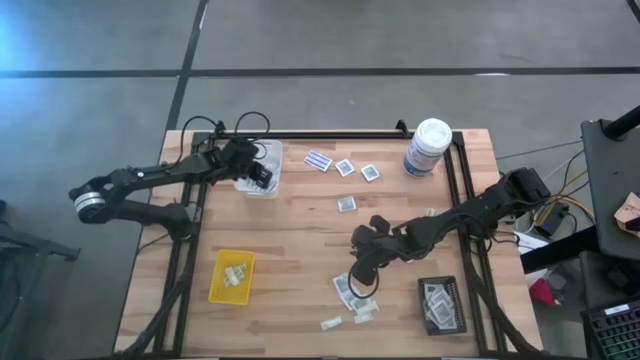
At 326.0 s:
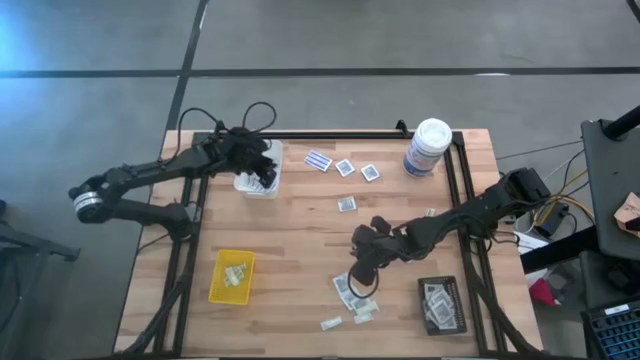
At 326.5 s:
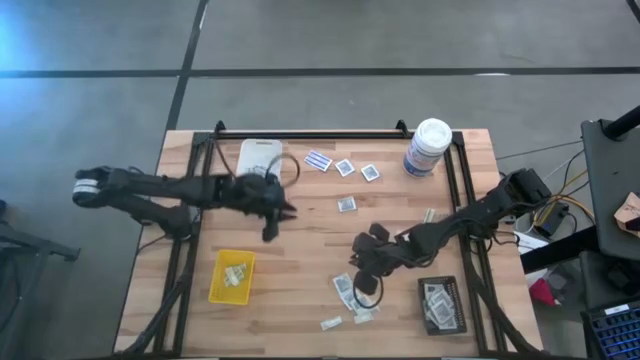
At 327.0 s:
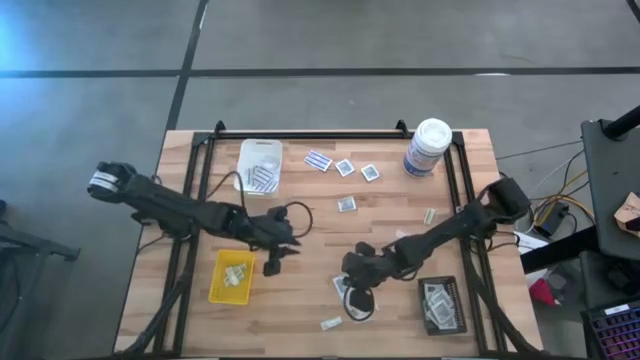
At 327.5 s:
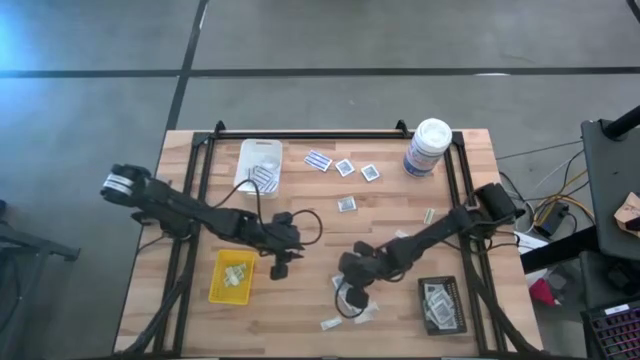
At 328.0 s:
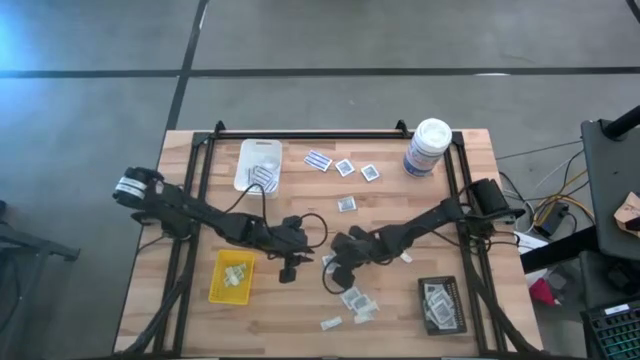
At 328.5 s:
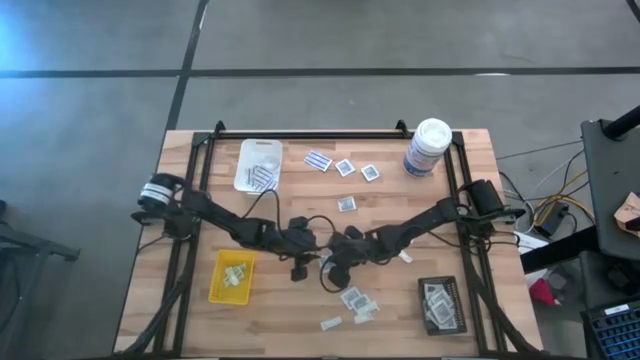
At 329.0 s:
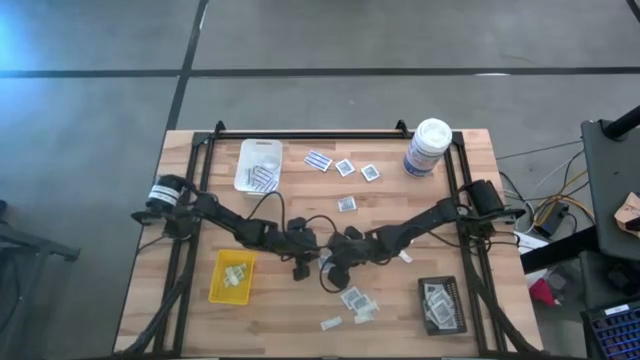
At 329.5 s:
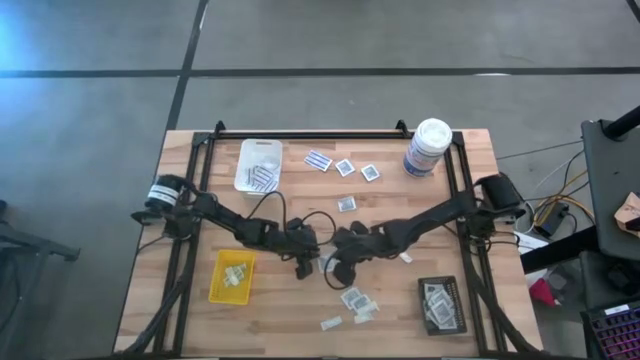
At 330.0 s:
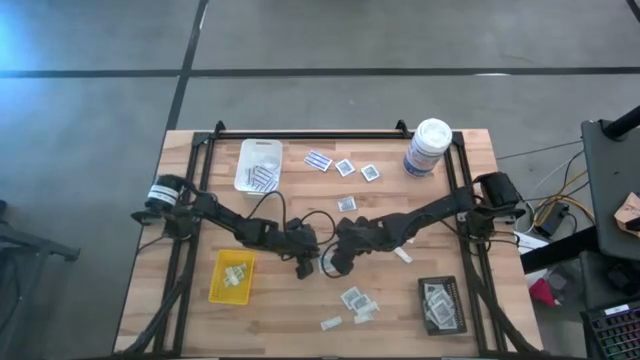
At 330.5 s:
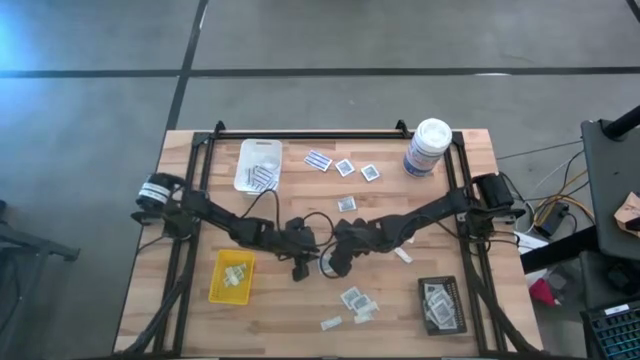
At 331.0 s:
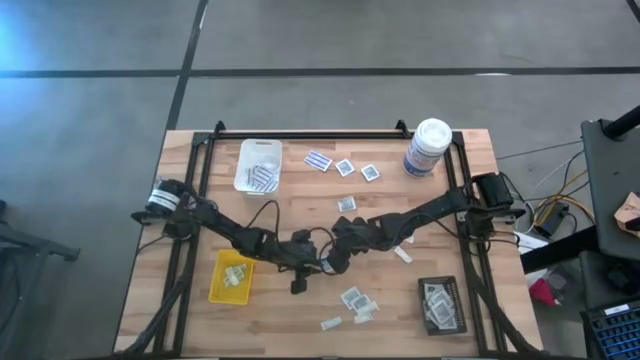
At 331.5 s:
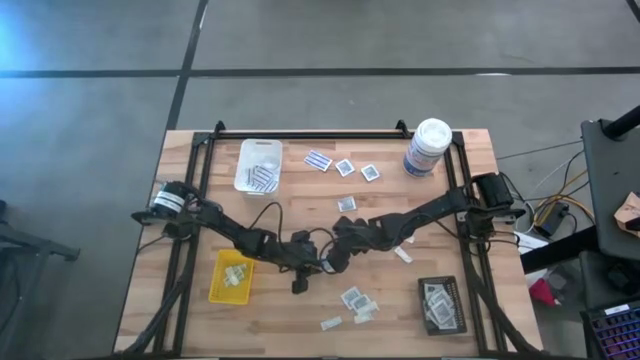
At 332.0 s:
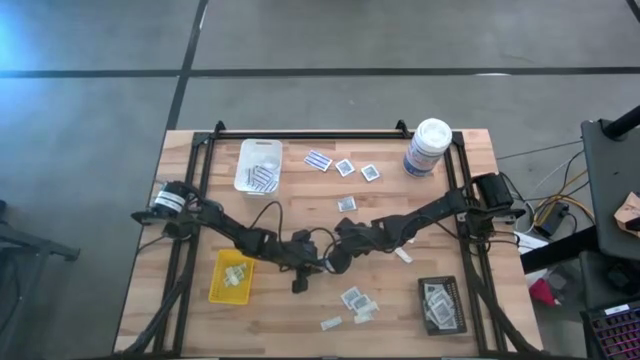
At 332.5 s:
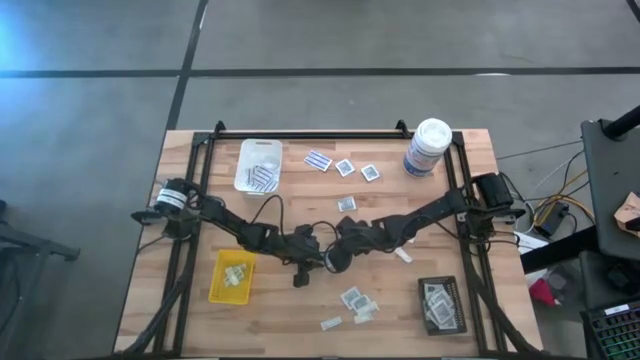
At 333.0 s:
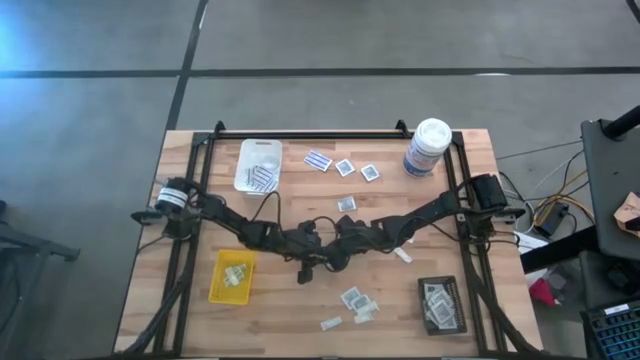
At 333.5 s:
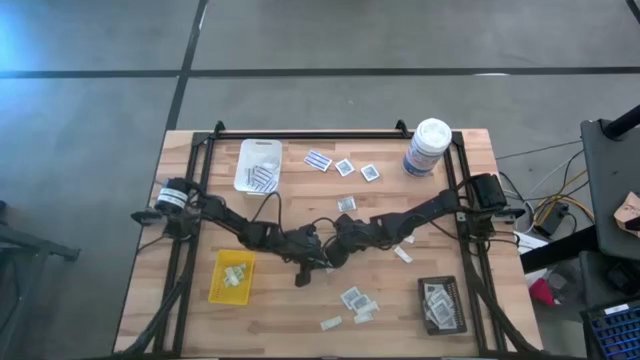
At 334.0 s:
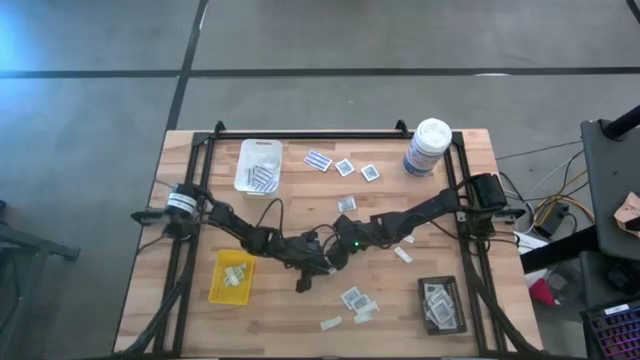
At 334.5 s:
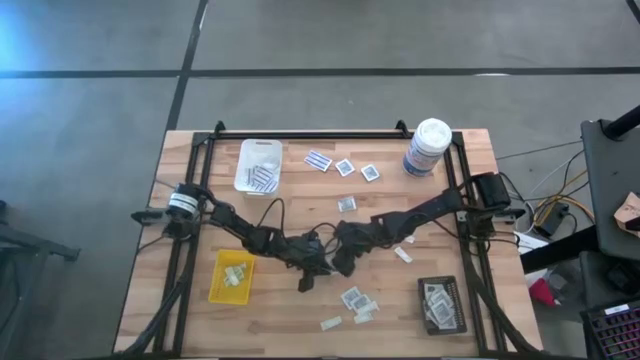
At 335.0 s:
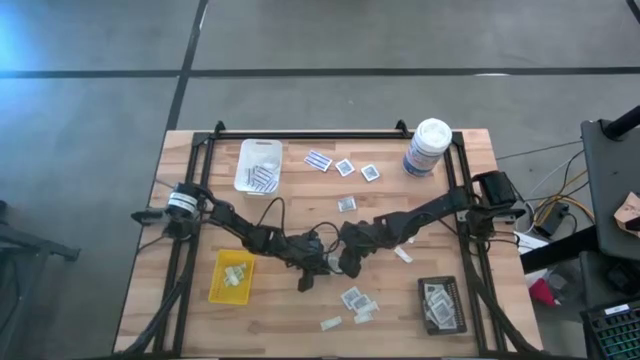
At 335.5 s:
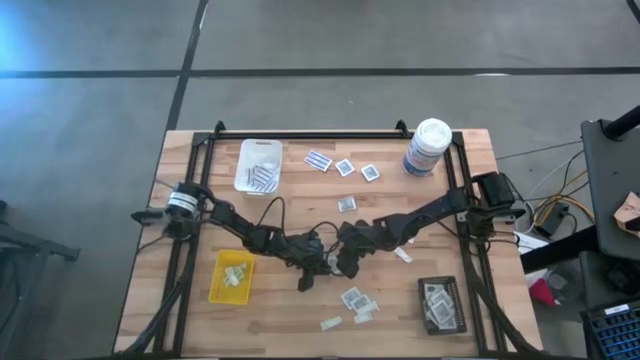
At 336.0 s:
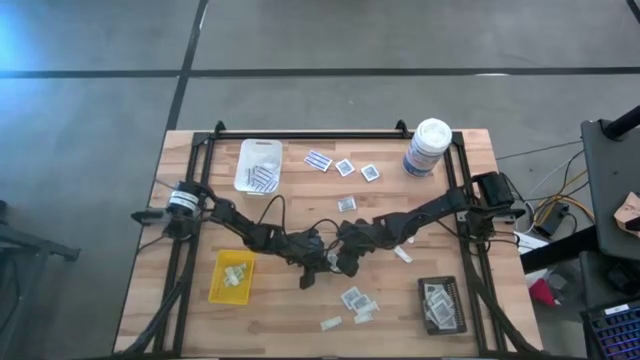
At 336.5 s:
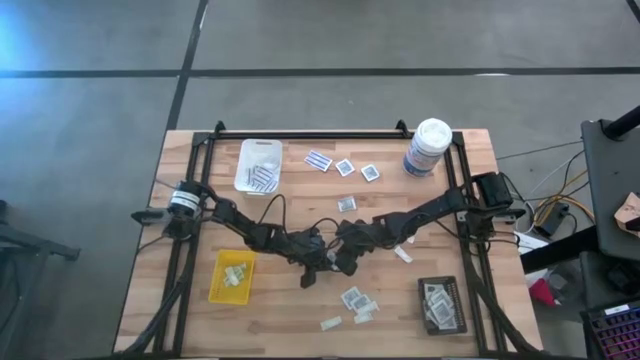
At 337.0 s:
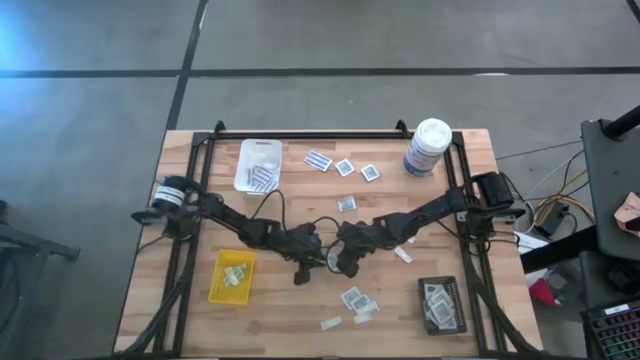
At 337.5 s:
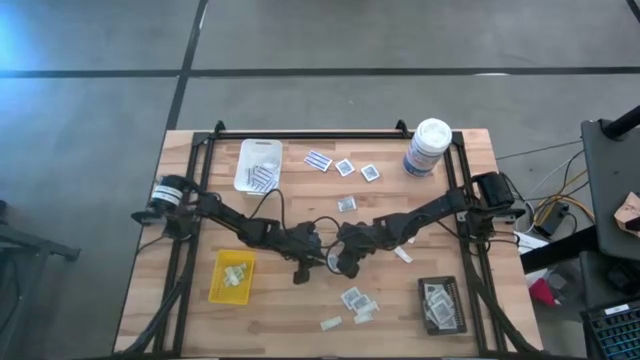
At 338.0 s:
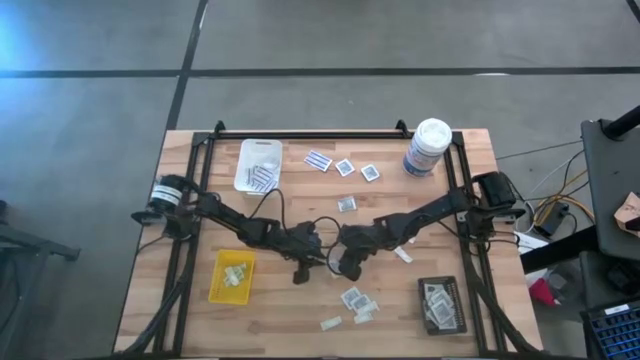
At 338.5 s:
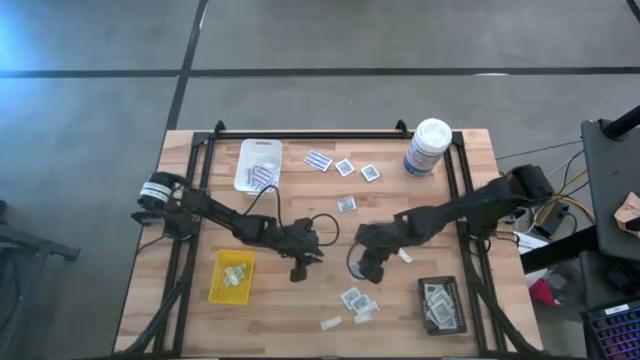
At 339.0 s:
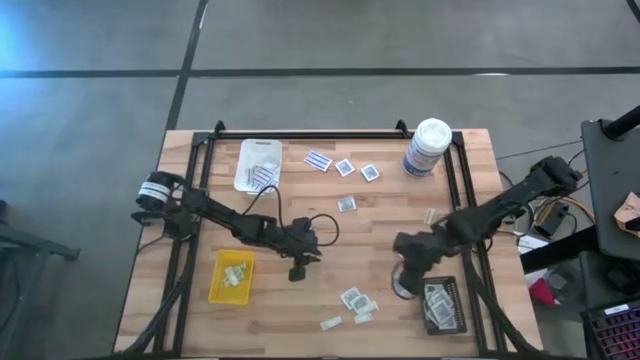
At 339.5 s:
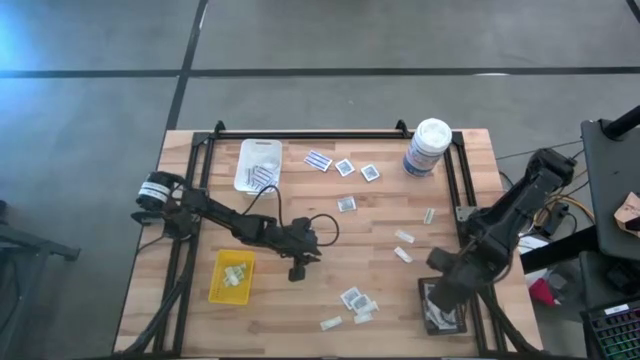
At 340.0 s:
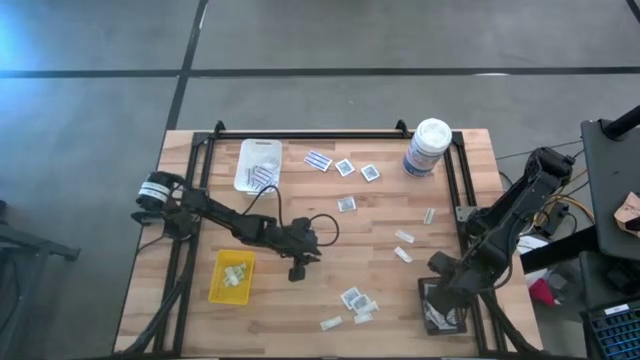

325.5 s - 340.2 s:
Task: Pick & Place First Aid Supplies
Put the towelette pack into the black bin

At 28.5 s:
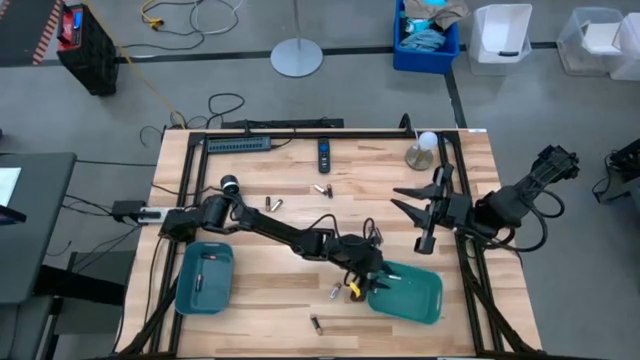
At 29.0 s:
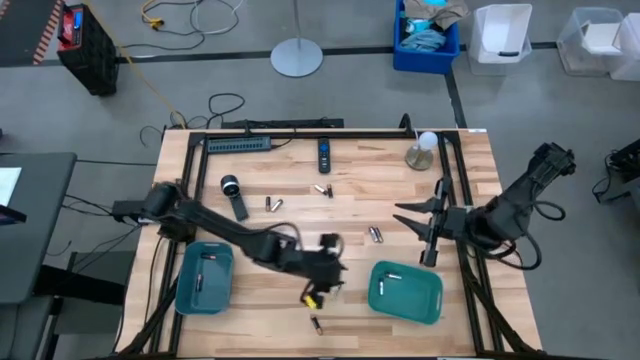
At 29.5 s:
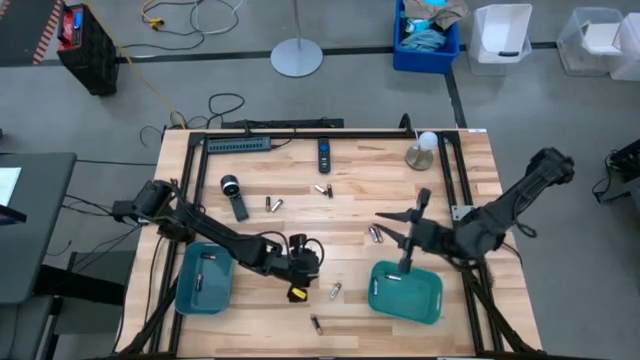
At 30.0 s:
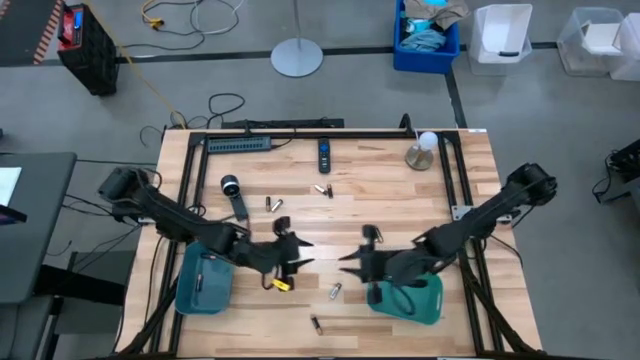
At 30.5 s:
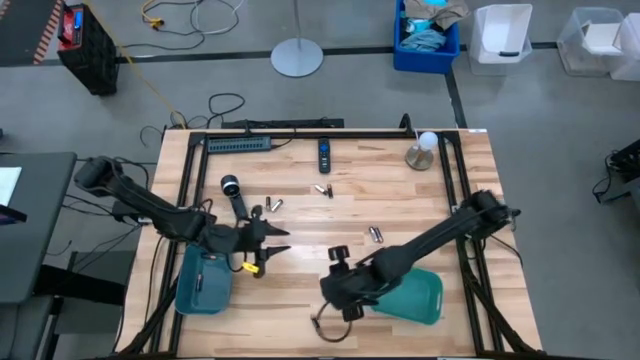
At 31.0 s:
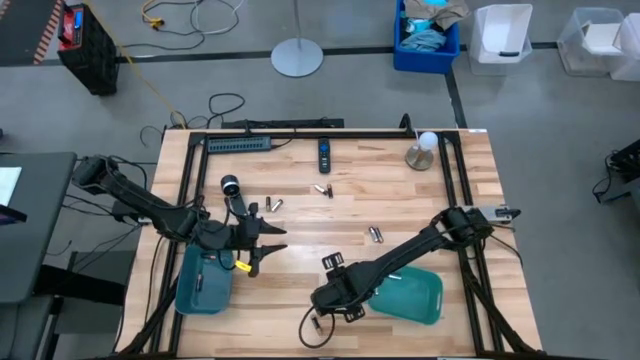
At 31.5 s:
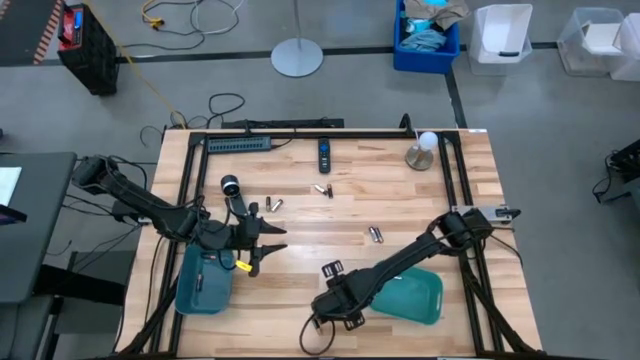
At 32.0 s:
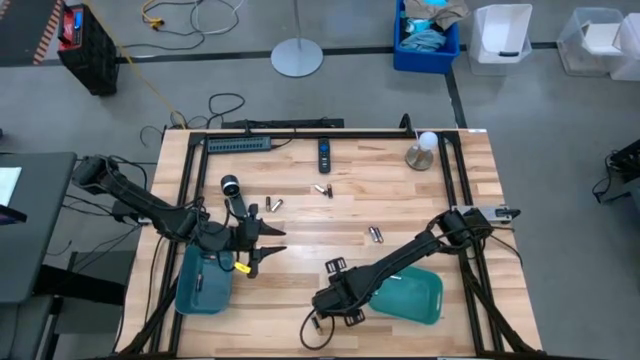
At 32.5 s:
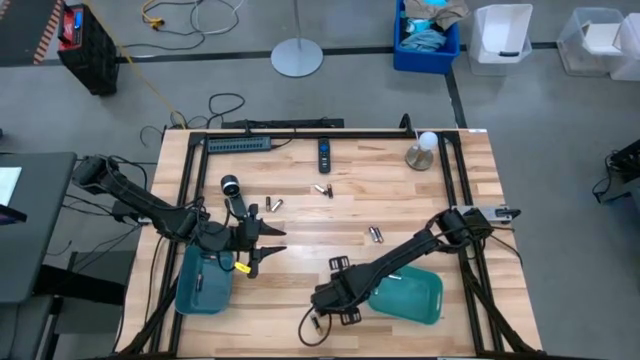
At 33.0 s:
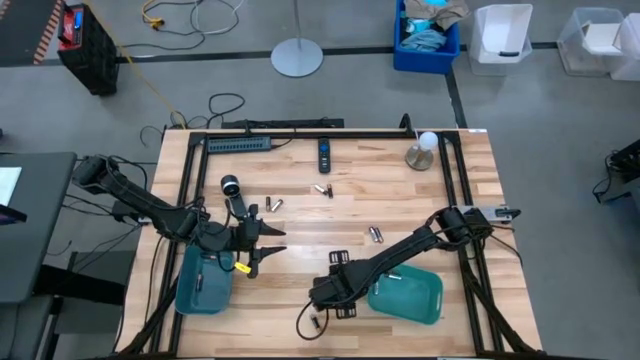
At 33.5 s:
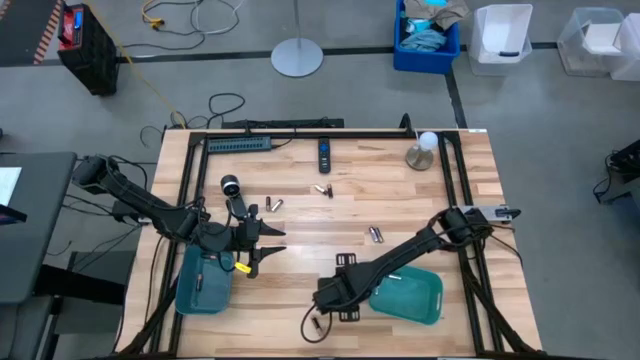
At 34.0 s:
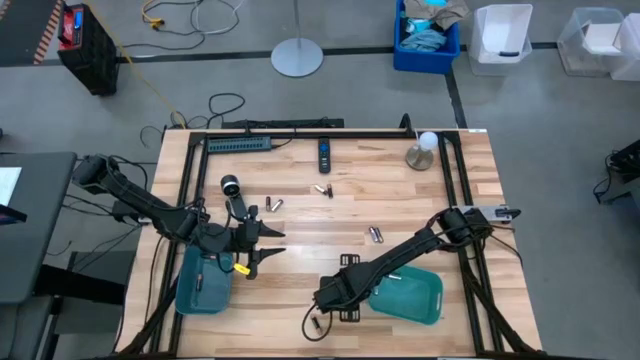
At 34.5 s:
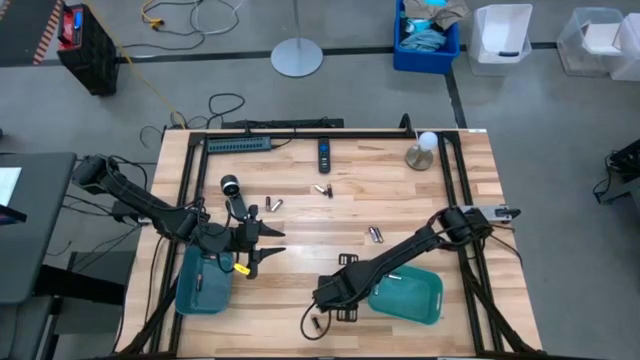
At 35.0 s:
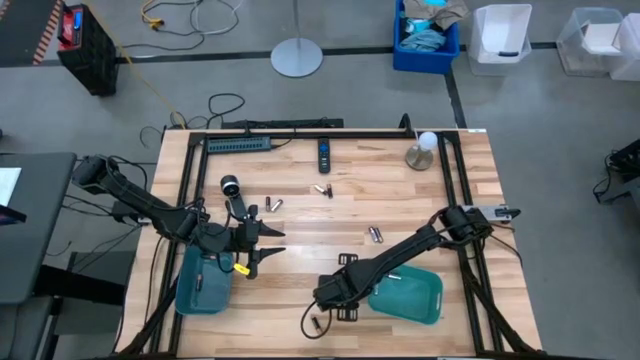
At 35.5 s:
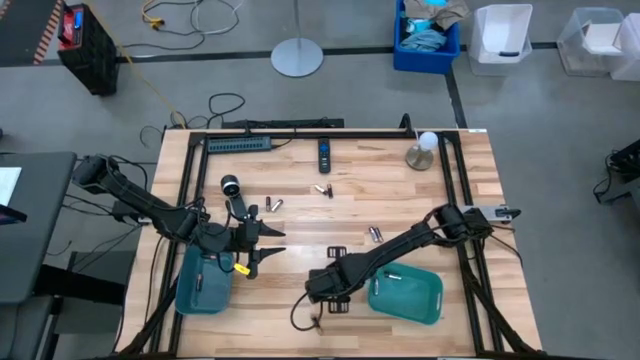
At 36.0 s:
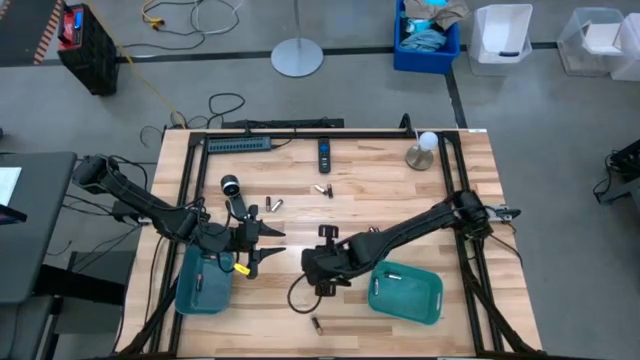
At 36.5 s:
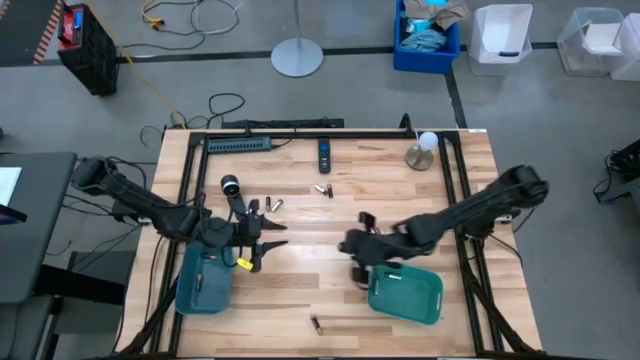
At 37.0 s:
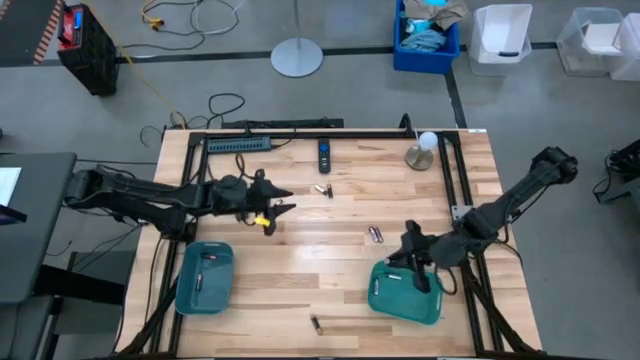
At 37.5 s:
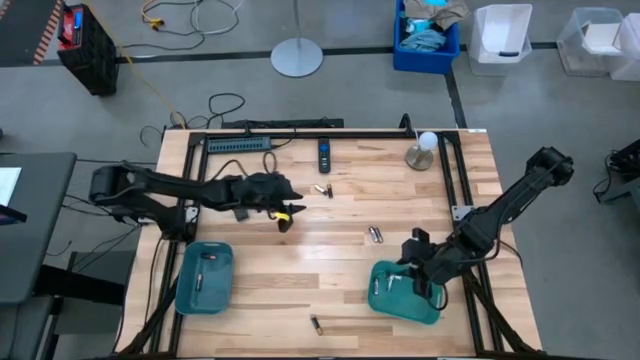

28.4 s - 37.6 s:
Task: Sort batteries
Put the silver battery into the green bin
